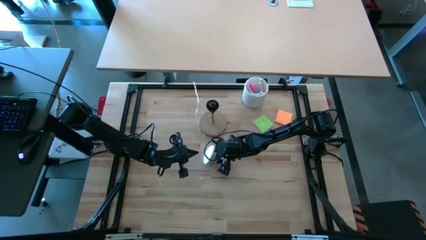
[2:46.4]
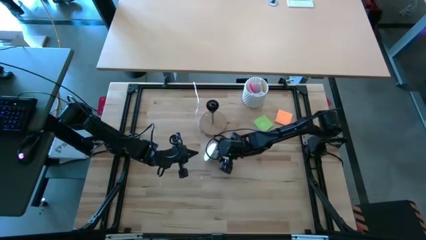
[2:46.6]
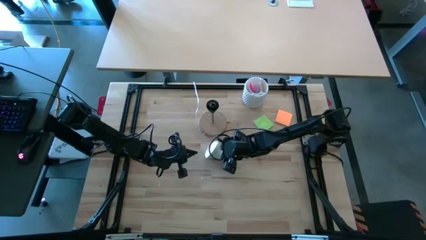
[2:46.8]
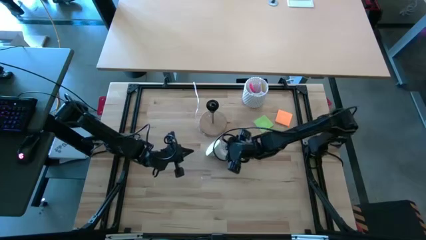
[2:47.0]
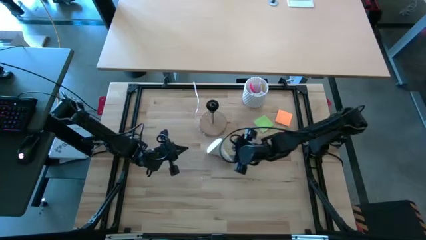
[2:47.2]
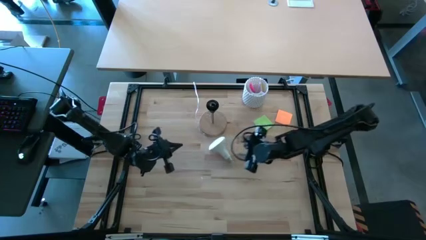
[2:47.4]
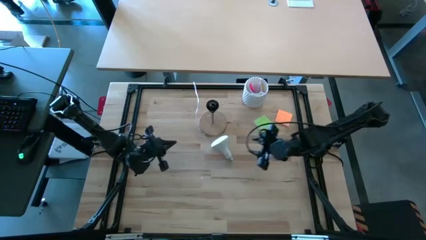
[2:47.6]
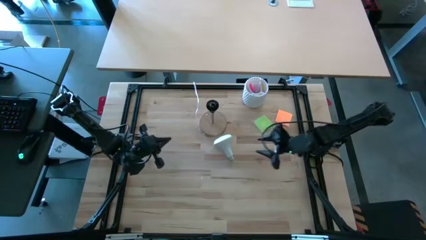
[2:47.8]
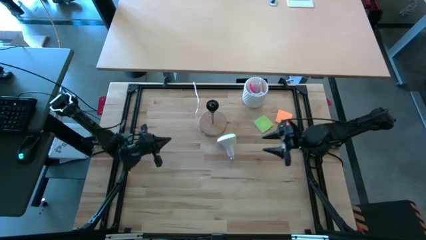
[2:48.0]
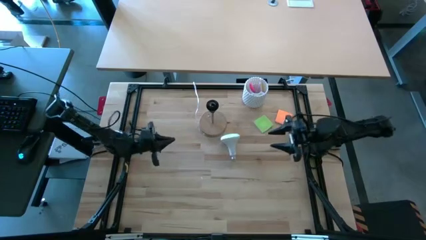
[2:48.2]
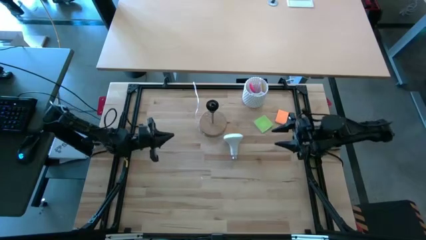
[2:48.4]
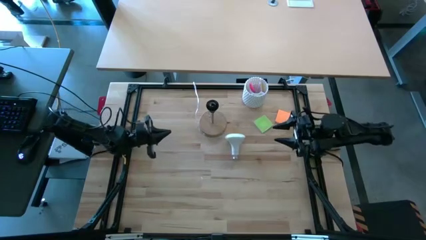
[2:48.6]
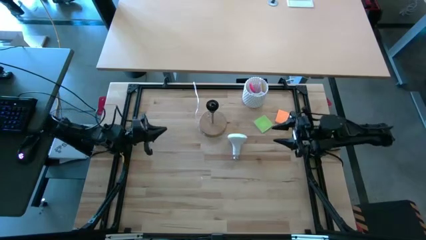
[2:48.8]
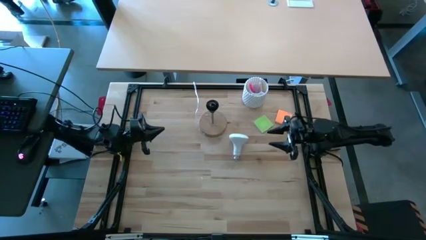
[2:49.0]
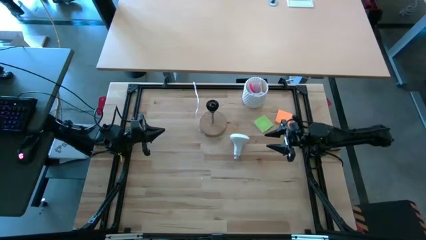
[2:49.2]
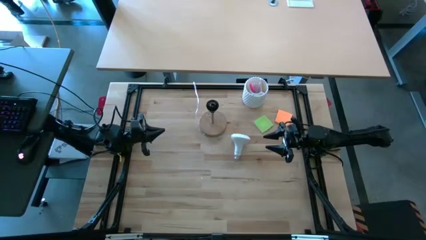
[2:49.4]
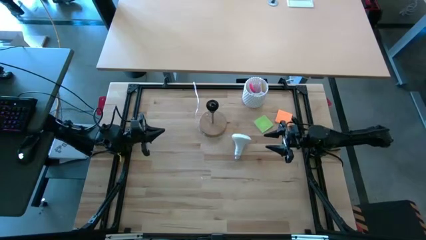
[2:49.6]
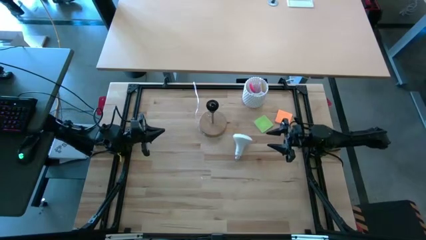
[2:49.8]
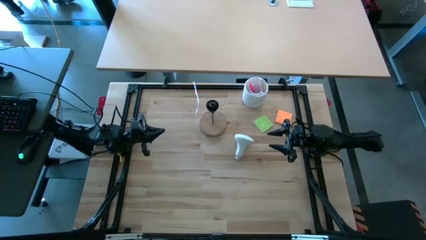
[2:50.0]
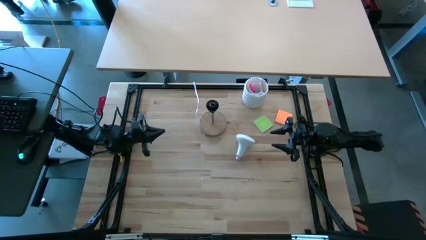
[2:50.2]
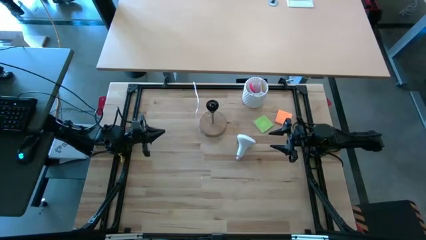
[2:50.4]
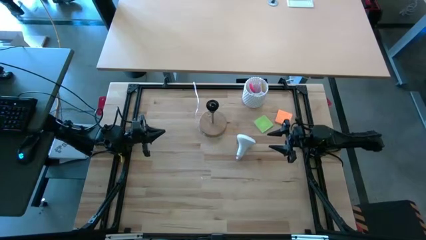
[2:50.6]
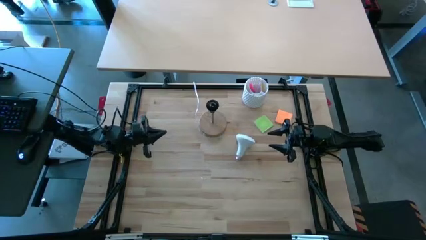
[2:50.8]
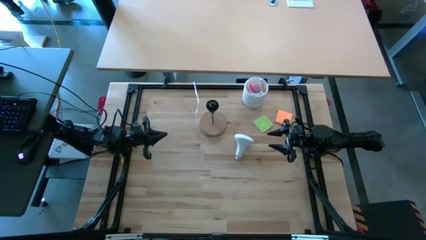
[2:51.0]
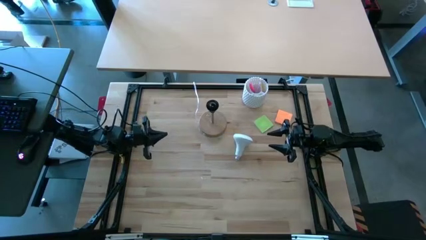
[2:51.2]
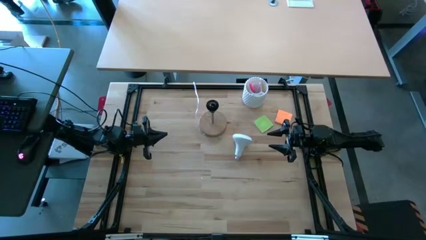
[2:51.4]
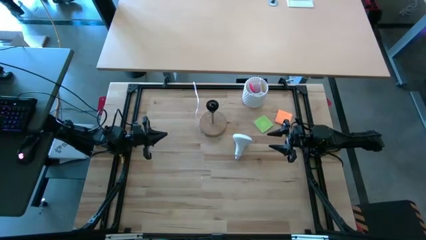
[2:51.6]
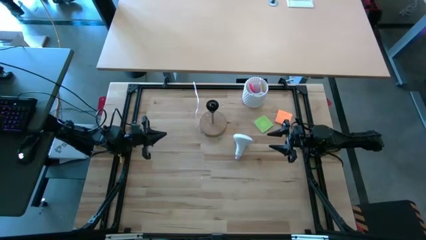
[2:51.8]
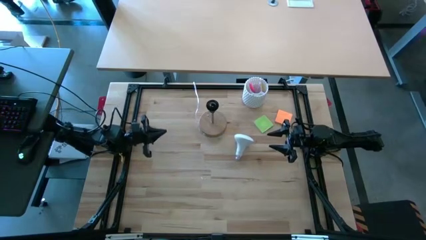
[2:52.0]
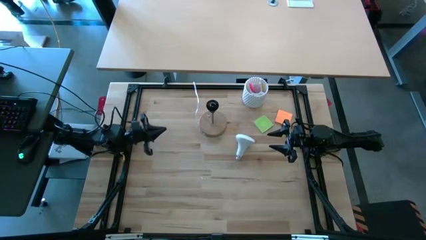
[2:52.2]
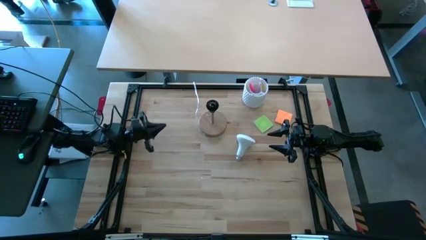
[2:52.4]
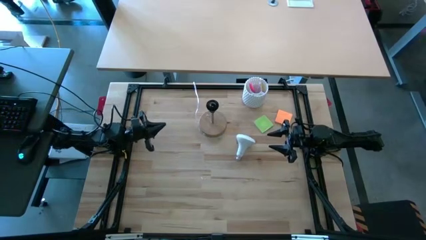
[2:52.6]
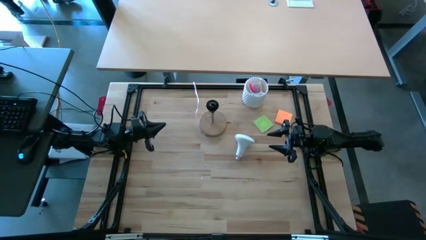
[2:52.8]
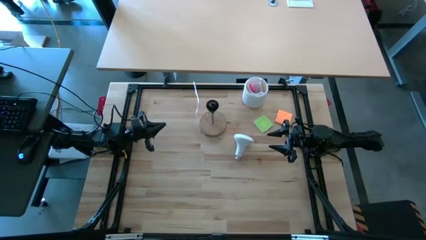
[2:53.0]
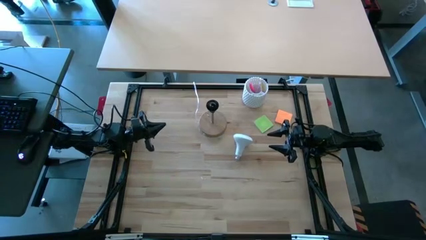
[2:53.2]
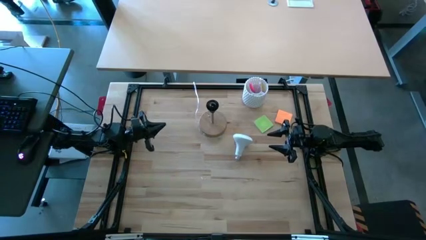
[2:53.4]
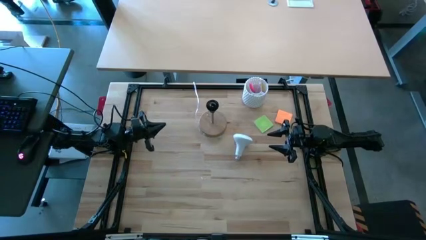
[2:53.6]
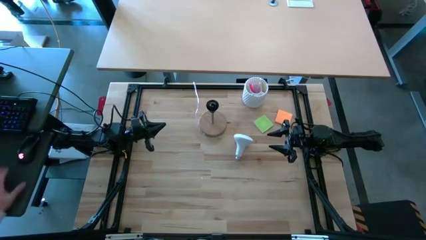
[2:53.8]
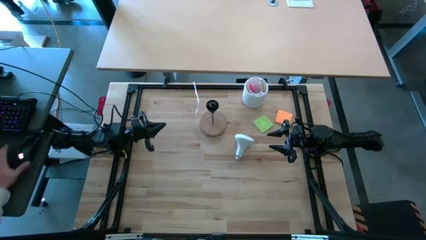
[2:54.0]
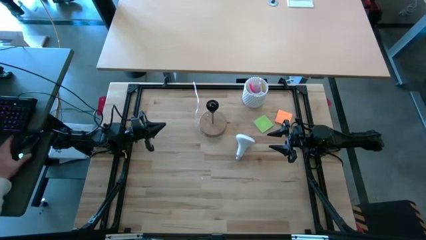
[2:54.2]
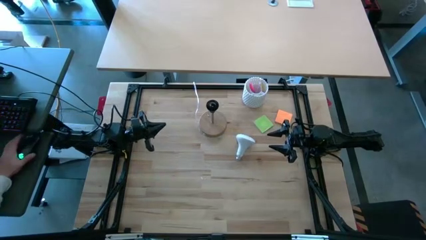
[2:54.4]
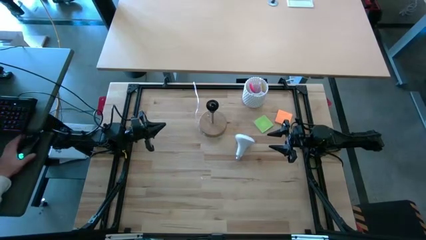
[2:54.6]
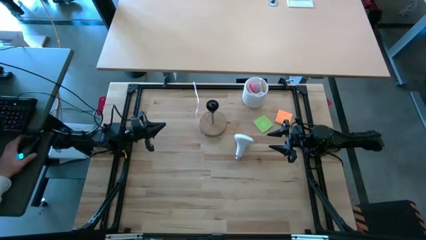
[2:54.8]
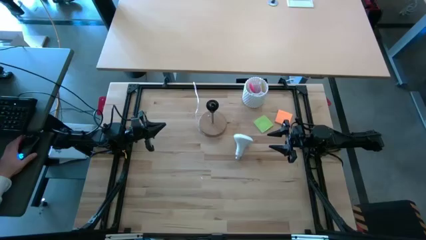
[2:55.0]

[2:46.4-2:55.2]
Task: Screw lightbulb
Return to Home Position

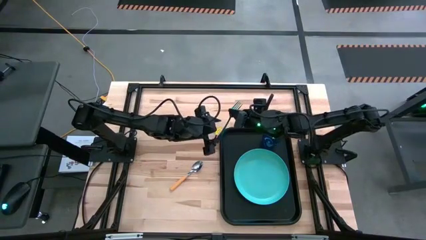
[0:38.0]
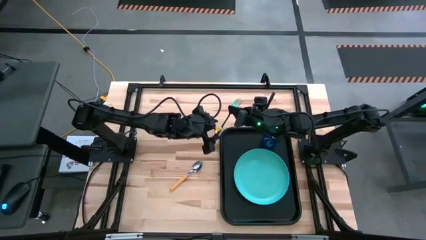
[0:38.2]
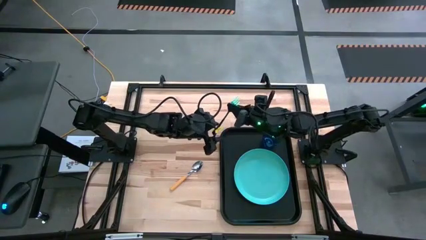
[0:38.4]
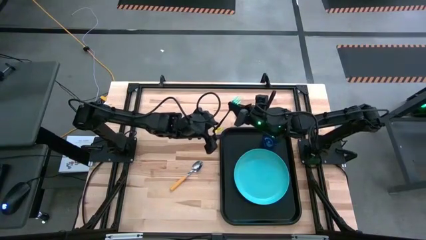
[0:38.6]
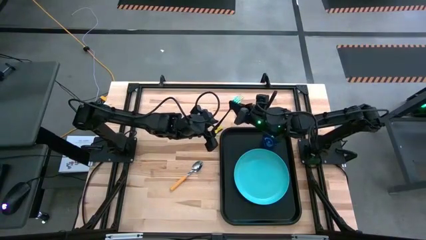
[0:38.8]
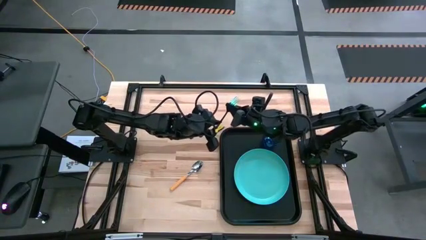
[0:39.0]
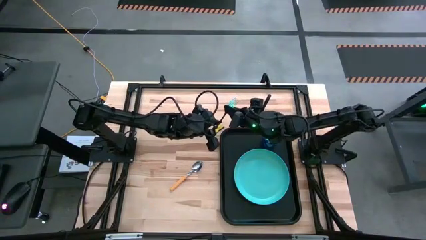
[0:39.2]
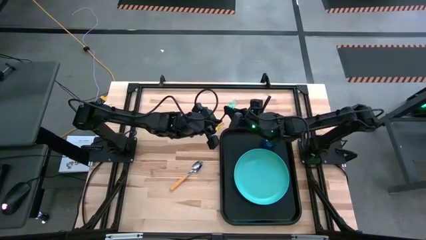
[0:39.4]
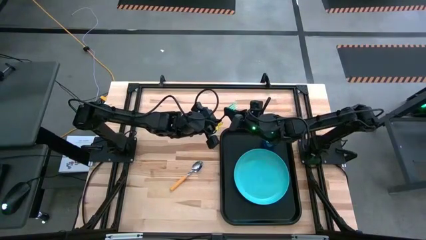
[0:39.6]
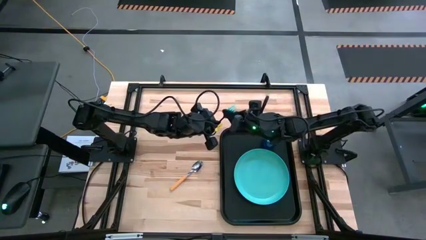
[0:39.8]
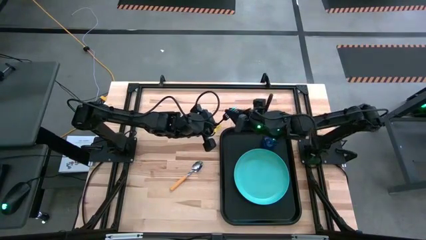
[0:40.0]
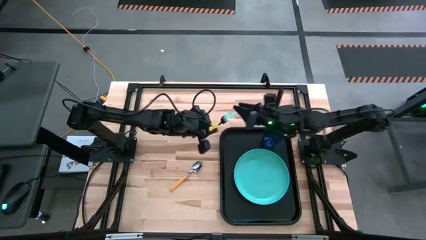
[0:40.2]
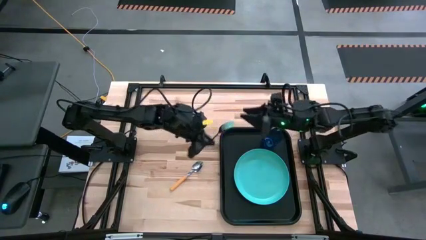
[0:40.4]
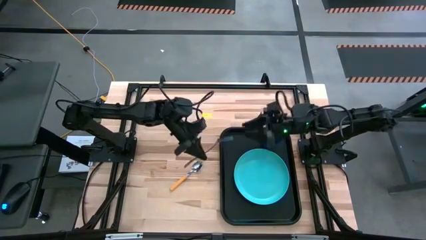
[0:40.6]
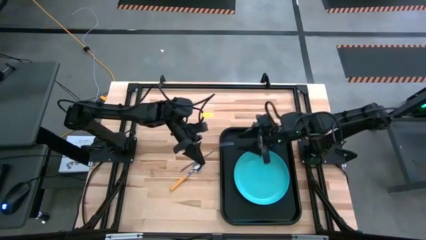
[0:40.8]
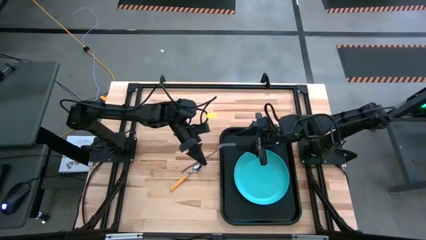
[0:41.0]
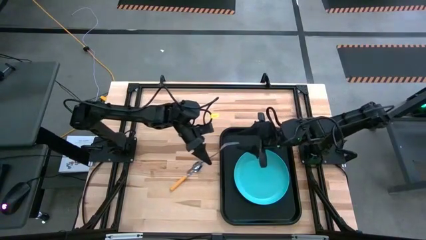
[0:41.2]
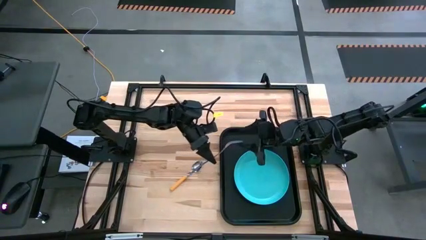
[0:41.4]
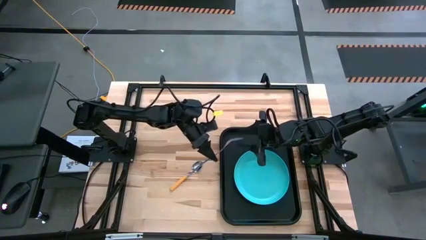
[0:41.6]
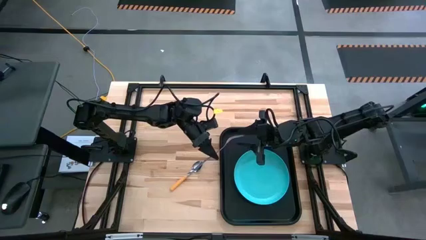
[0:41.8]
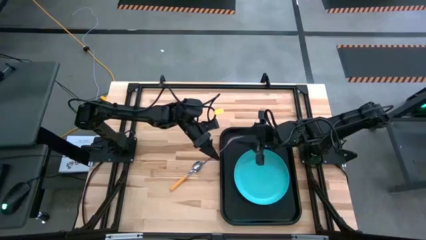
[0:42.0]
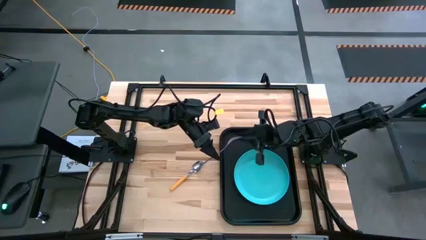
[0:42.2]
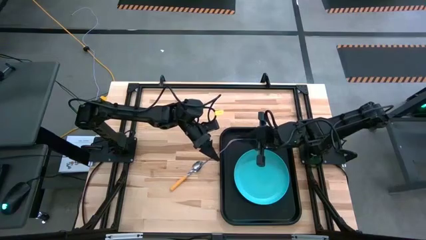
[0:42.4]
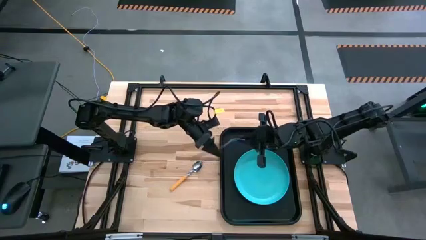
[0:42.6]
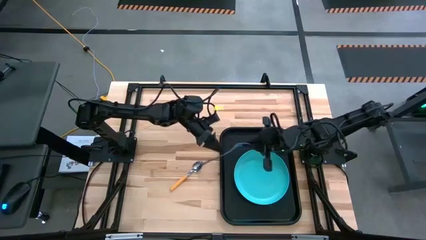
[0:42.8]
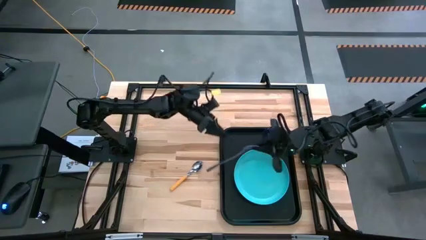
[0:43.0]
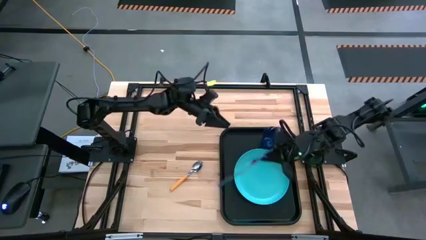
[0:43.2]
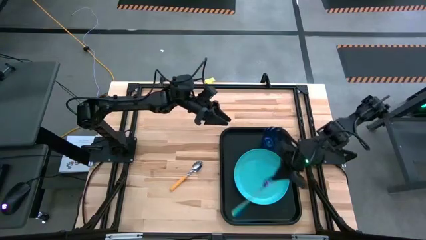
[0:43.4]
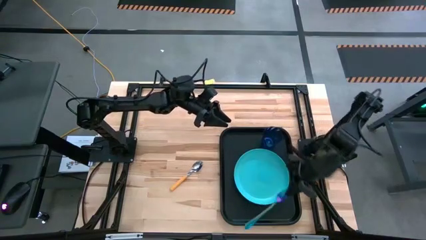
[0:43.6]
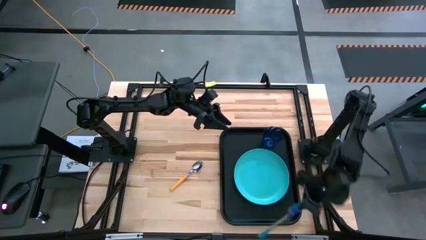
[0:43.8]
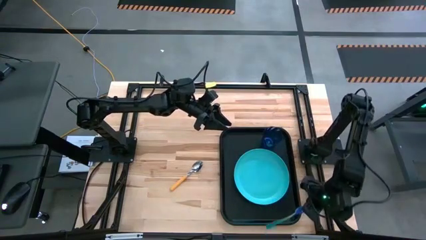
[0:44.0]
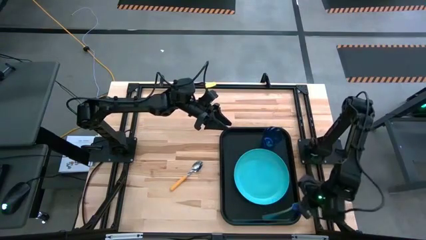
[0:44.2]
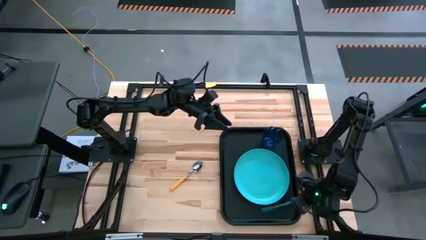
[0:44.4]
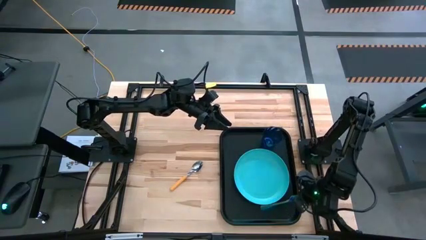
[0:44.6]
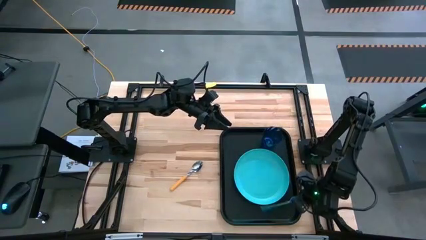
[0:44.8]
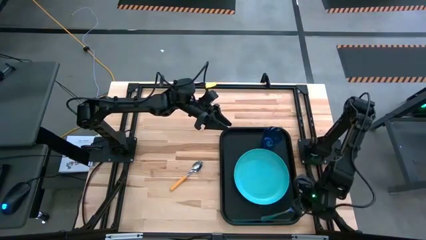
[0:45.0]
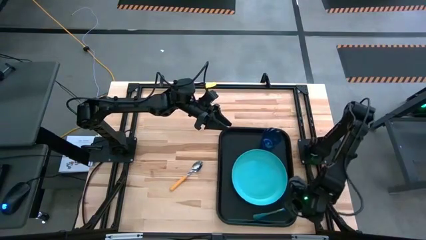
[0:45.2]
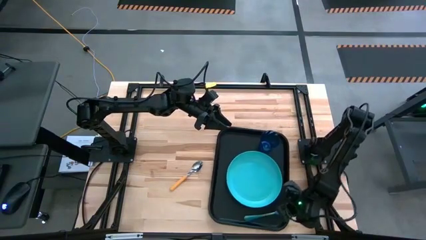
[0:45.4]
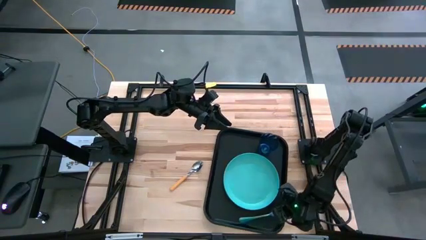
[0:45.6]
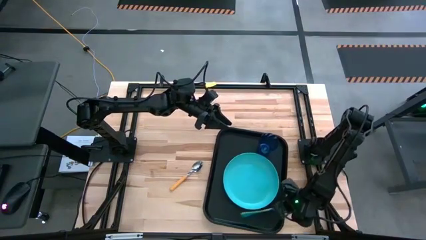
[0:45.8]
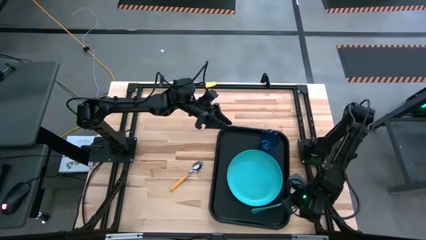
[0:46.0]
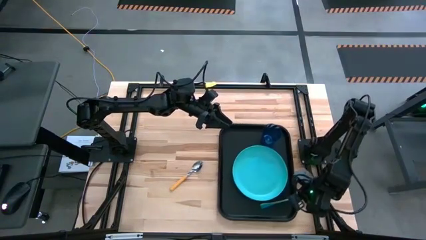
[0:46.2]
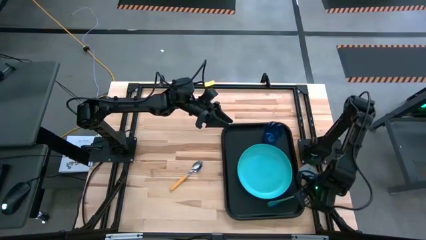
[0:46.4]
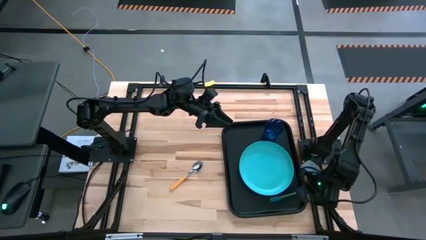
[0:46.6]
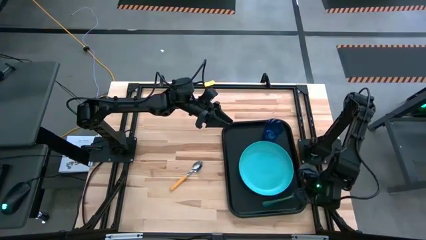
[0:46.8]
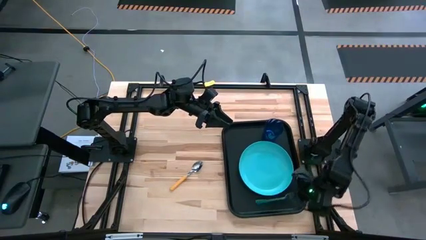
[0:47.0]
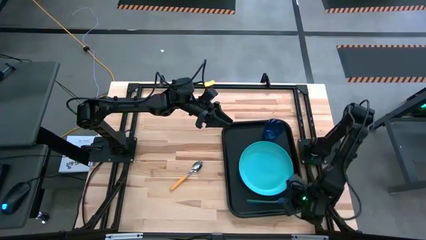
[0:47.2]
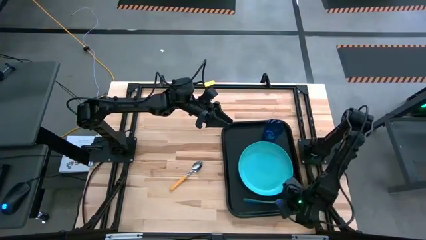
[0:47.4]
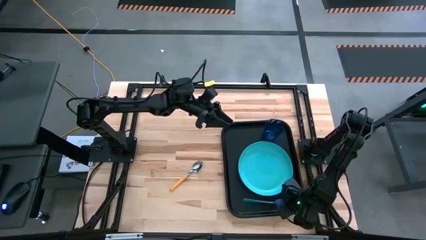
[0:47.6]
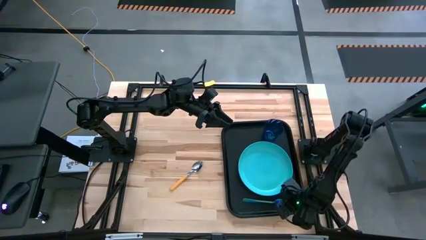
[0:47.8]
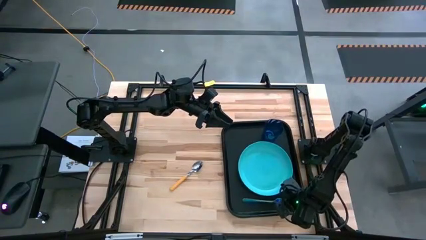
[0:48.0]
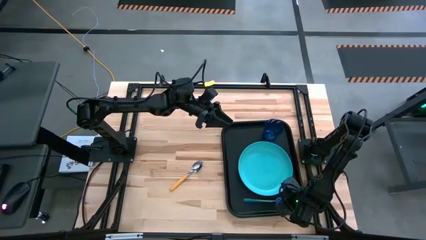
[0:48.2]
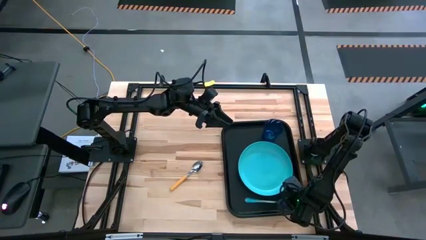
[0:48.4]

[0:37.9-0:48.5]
Task: Pick and place plate/cup/fork/spoon on tray
Put the blue fork on black serving tray to the right of the blue plate
